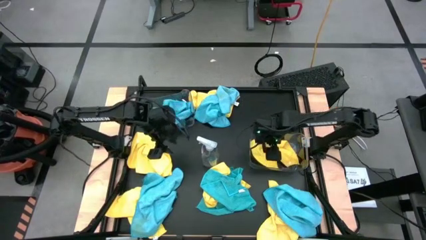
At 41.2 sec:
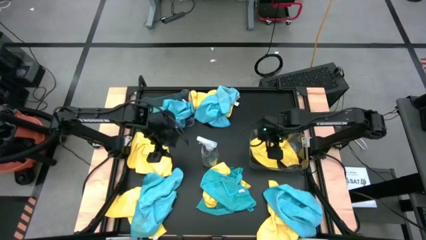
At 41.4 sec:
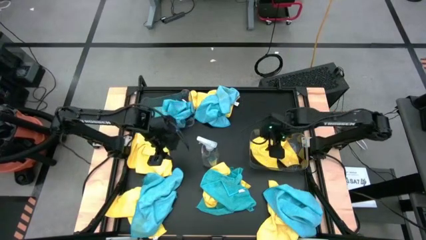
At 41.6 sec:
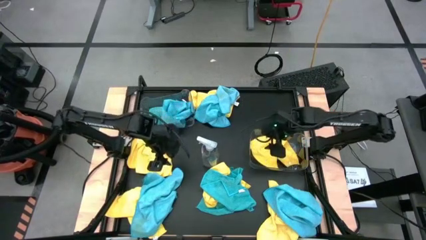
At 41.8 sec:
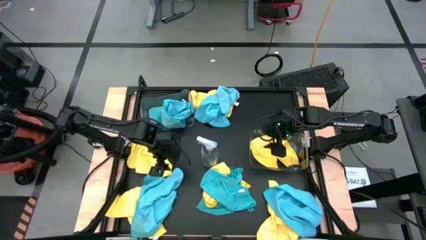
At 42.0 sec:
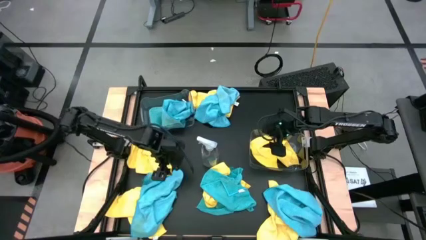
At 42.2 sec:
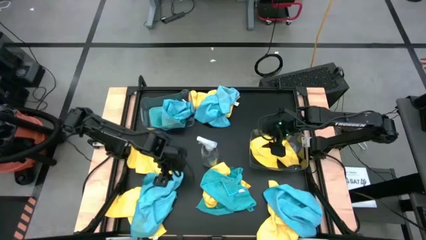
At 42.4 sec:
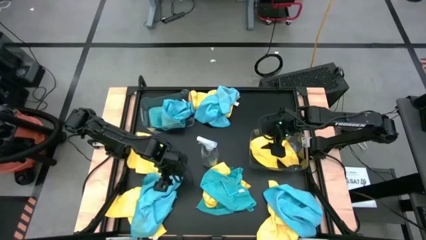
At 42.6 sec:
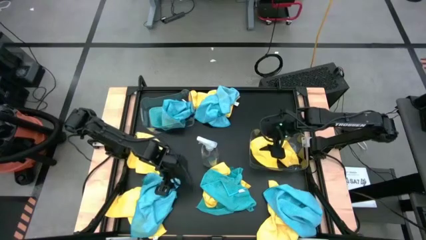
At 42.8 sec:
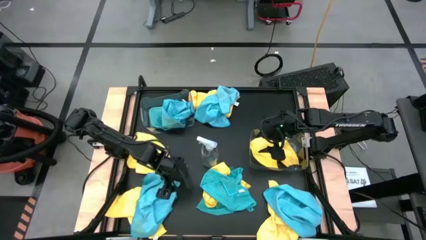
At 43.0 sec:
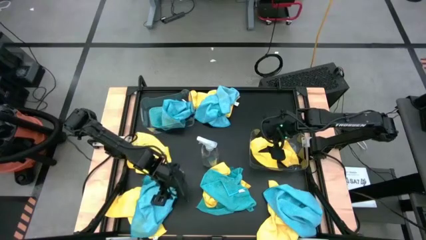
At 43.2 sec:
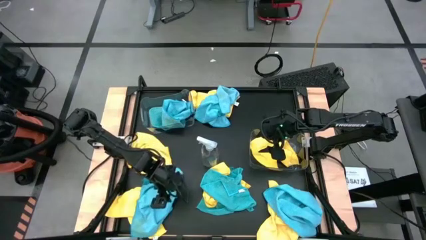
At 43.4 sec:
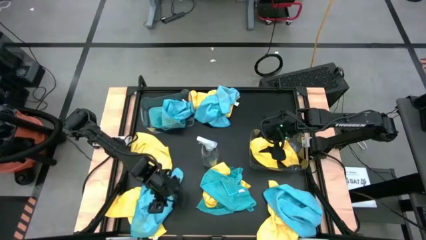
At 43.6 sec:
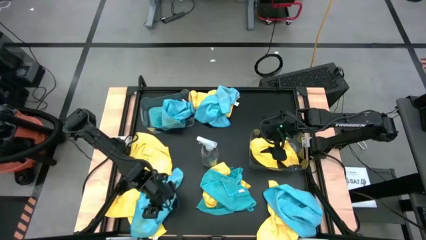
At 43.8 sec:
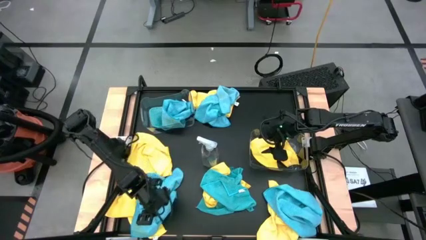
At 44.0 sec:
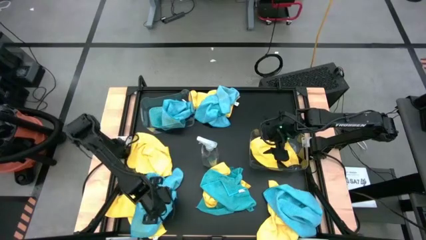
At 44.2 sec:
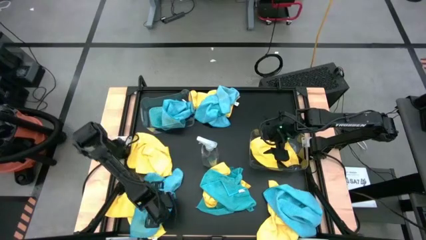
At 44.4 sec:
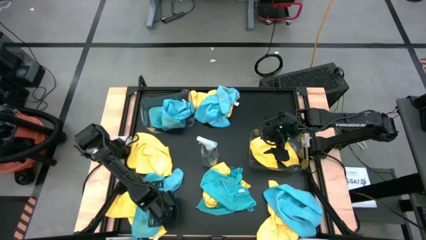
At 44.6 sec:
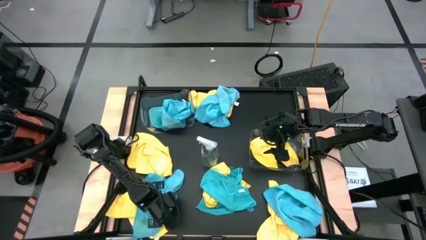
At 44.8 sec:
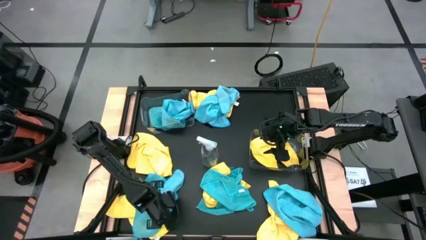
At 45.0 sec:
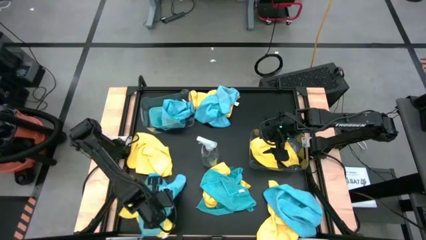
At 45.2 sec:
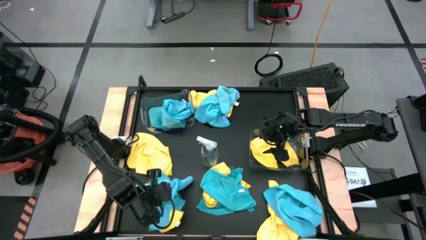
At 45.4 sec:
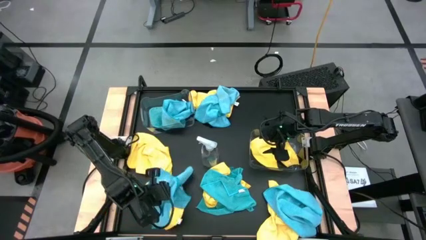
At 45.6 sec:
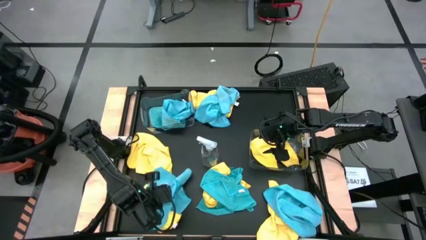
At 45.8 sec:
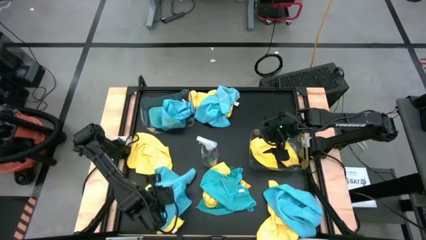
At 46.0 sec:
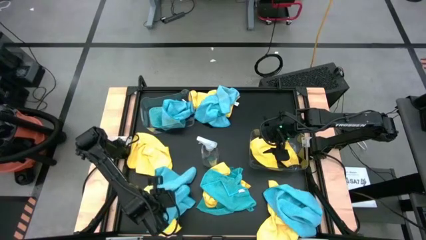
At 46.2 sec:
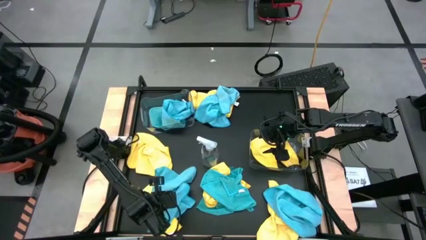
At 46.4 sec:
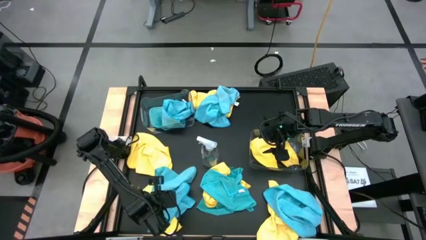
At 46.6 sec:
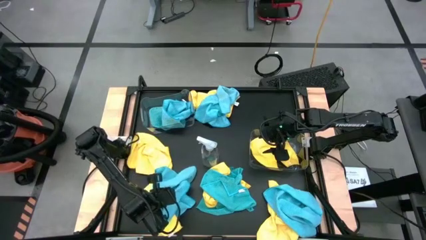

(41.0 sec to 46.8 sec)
Task: Sort microfiber towel by color & place in baskets
Put the blue microfiber towel into the top transparent bin

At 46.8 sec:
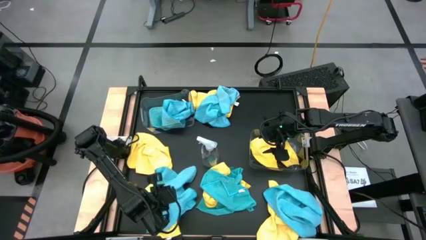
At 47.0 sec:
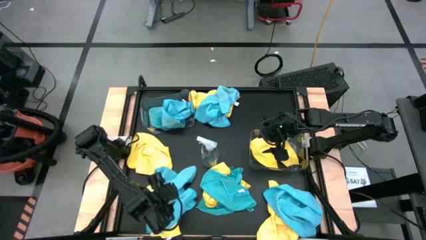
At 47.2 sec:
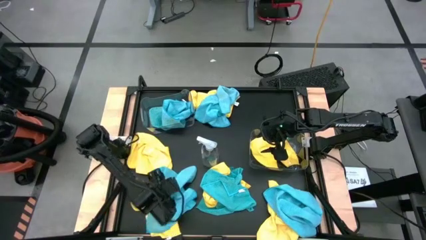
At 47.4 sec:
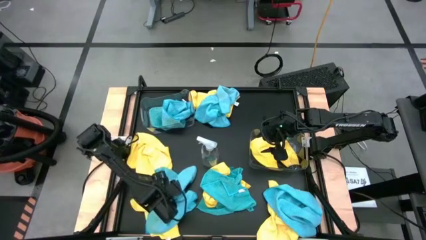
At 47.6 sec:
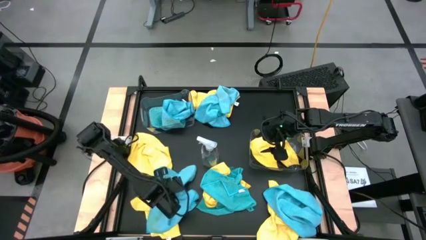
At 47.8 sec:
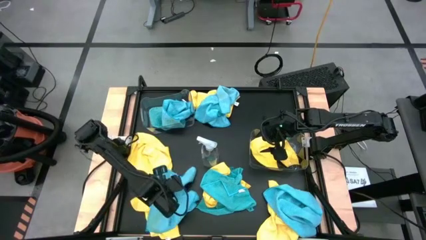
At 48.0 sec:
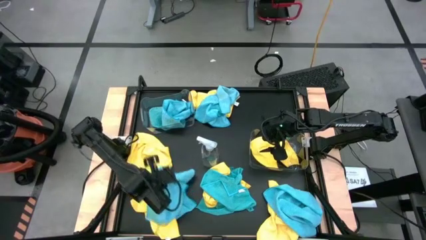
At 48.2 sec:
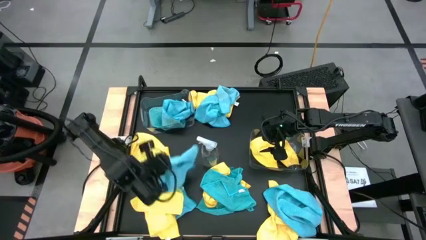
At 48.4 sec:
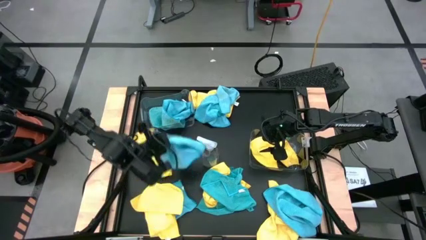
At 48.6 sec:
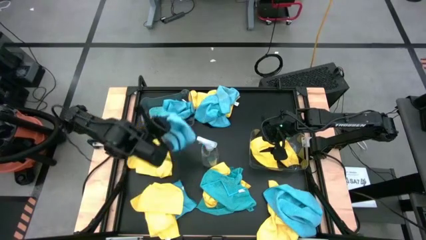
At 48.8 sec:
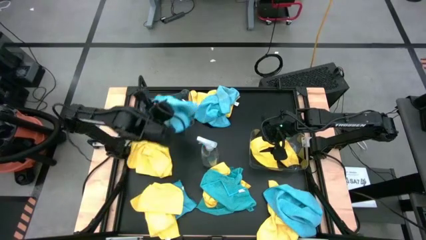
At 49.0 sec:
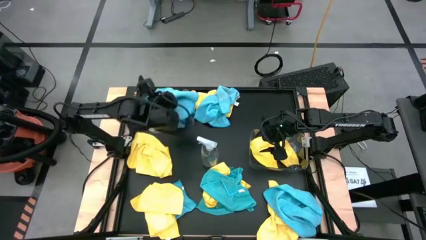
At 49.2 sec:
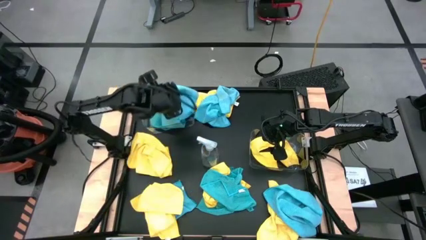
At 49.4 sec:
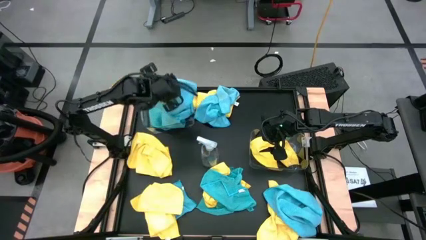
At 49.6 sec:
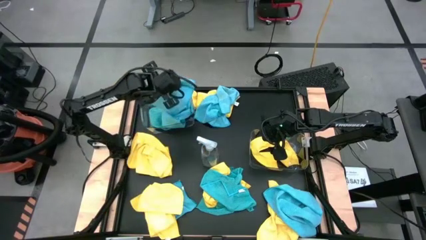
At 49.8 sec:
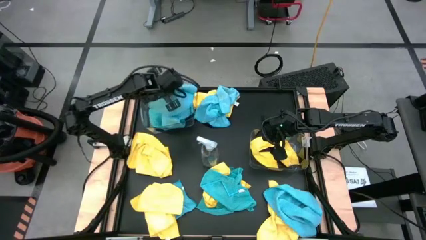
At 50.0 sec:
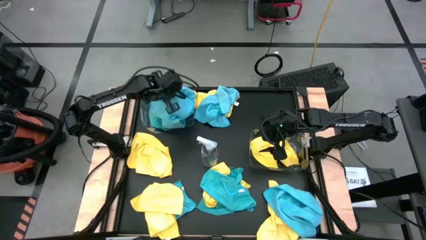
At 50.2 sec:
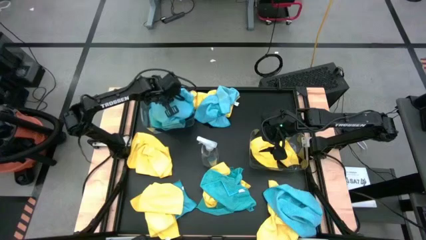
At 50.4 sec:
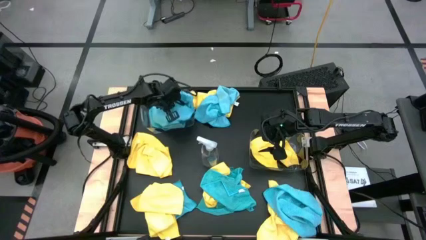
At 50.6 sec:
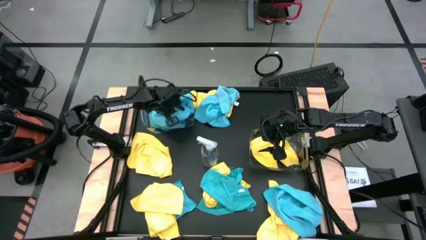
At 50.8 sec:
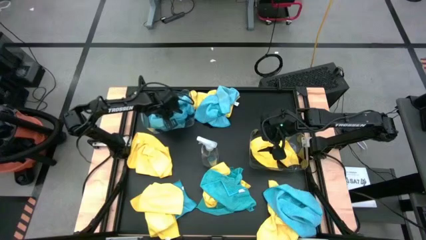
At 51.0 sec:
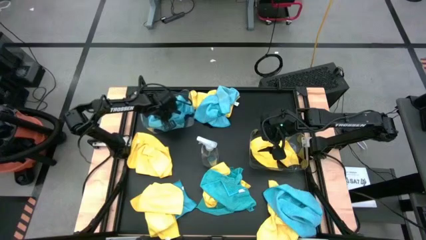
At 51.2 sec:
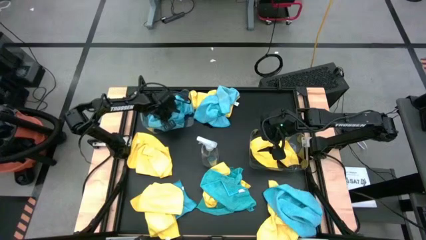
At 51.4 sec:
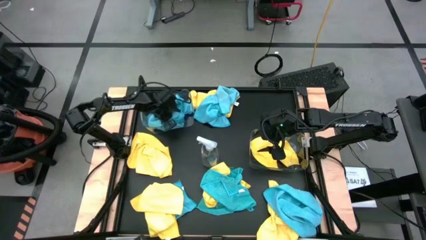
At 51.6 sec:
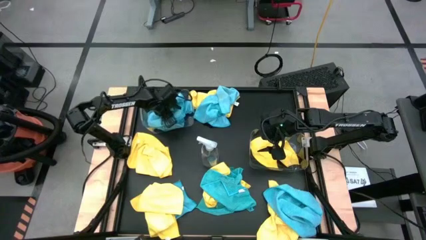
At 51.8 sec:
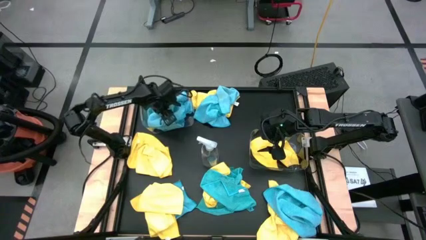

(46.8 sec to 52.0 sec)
Put the blue microfiber towel into the top transparent bin
